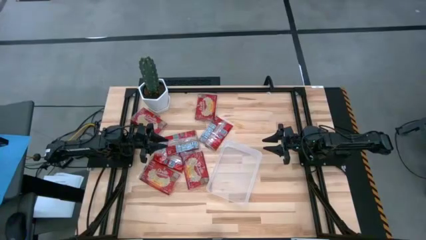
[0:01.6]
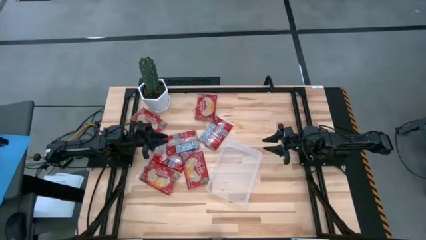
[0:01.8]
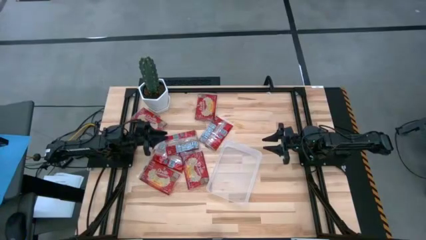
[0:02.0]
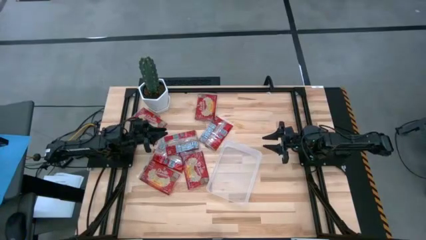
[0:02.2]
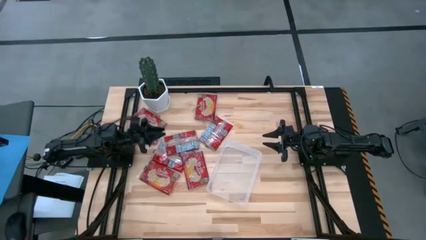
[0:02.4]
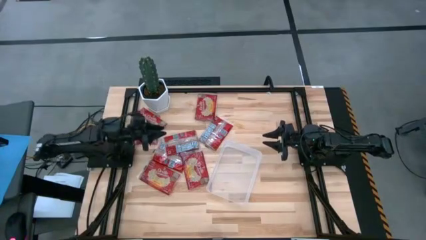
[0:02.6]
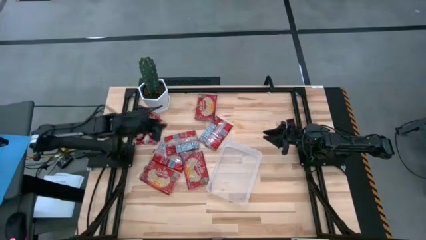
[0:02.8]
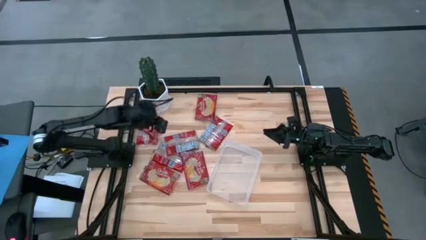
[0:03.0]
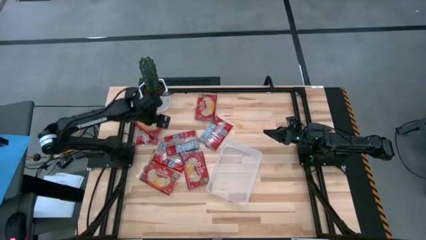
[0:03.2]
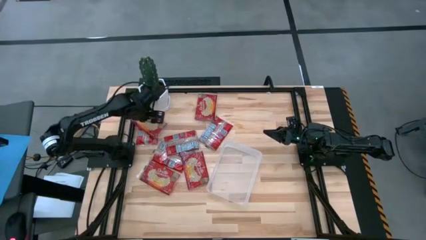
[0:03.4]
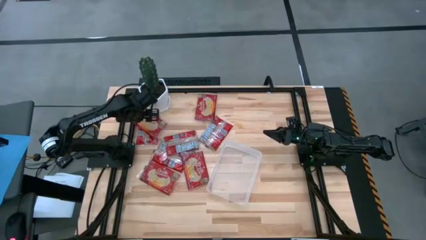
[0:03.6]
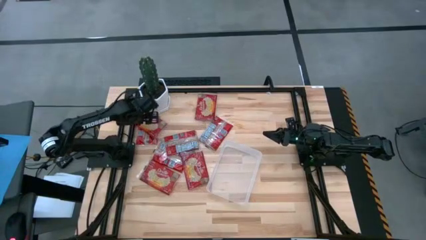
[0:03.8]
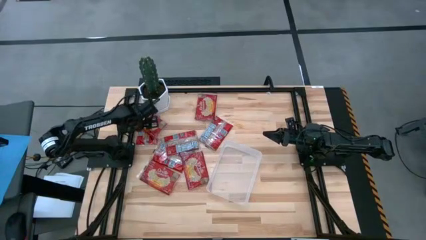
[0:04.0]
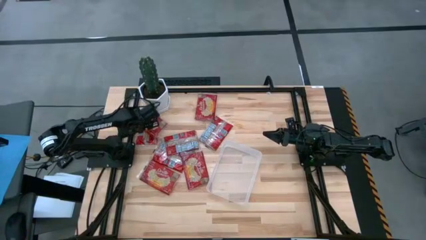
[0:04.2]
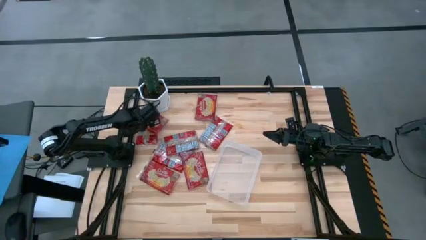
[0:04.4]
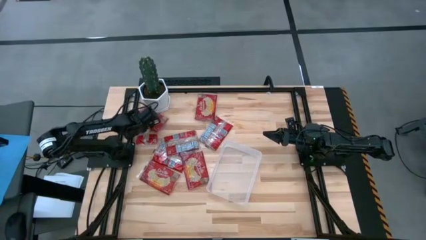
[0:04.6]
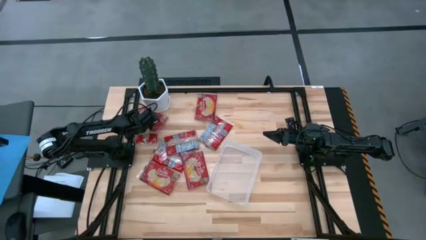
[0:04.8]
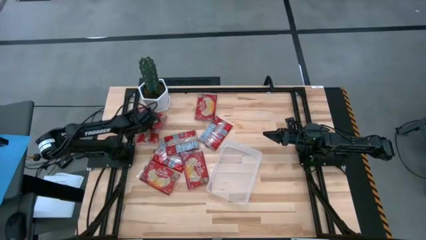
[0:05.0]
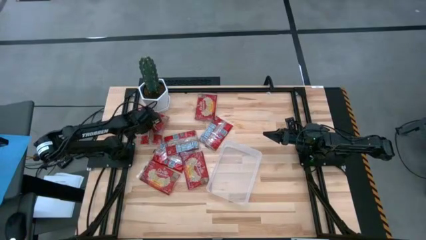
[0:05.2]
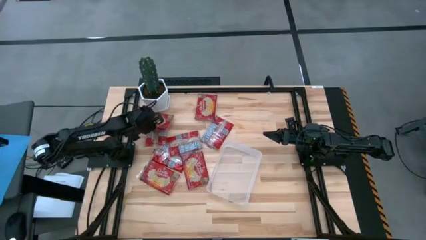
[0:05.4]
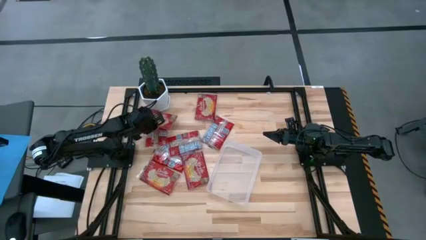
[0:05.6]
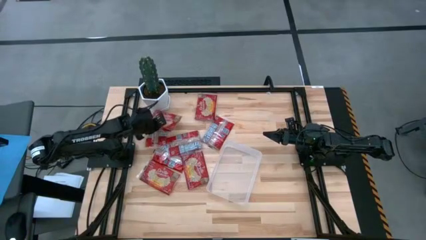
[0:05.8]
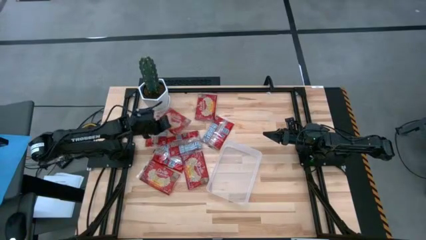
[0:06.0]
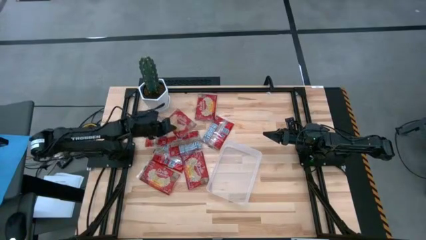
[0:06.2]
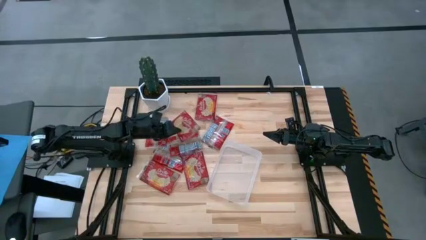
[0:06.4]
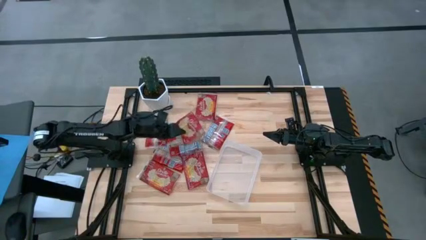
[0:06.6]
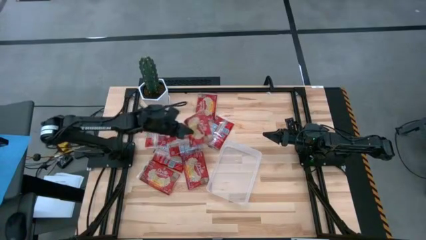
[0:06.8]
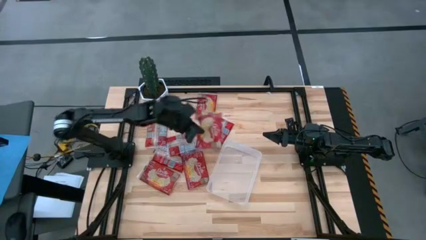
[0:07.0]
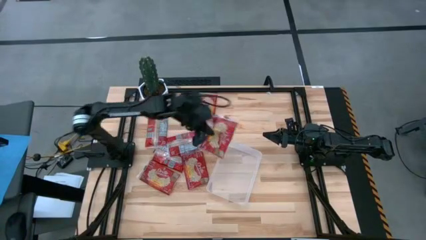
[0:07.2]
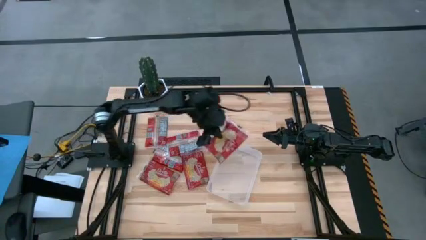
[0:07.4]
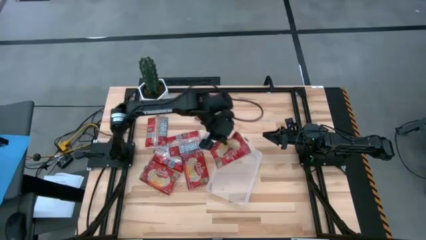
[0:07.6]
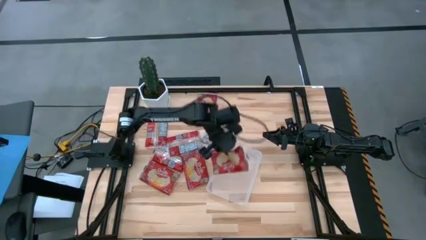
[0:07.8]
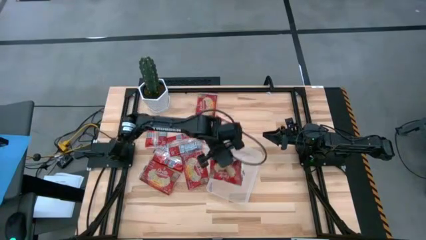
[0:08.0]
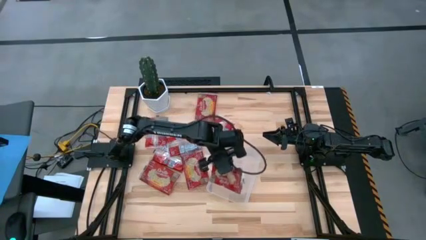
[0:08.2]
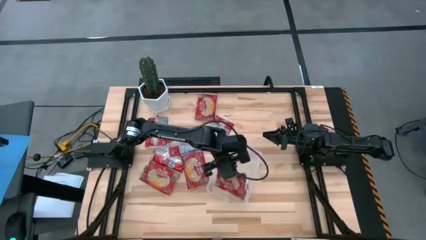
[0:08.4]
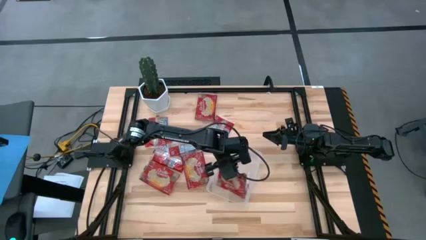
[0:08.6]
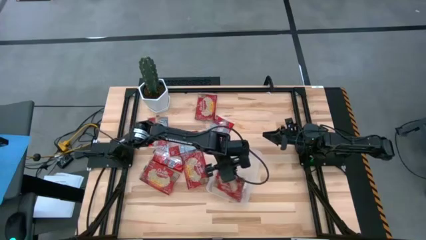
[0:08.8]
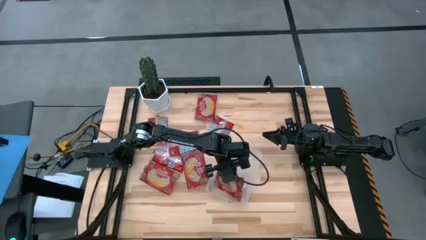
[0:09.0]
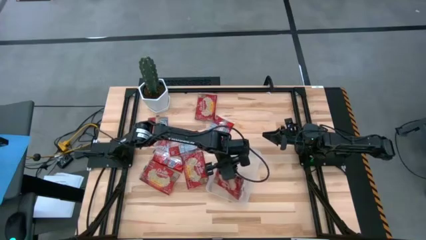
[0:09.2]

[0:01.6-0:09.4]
Task: Sort popcorn bags into baskets
Put the red popcorn bag into the transparent bin

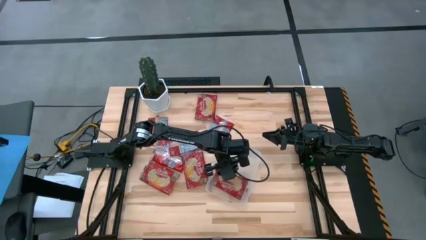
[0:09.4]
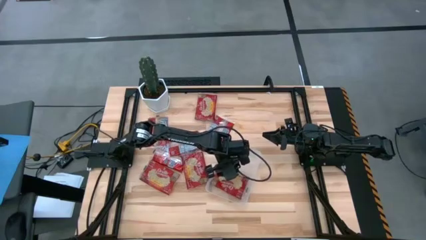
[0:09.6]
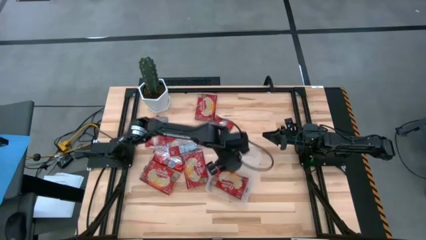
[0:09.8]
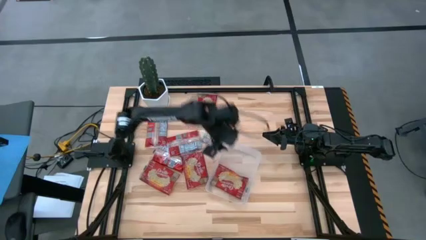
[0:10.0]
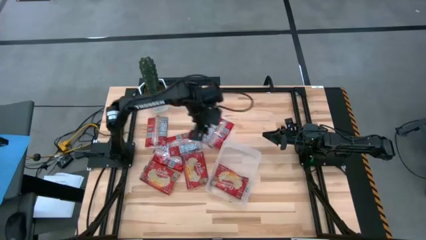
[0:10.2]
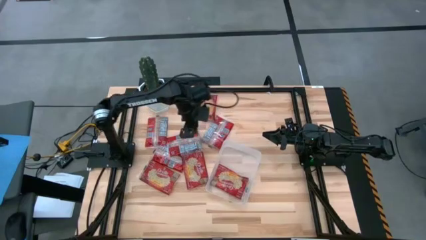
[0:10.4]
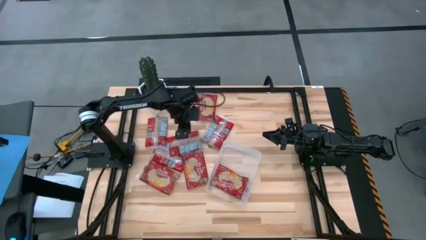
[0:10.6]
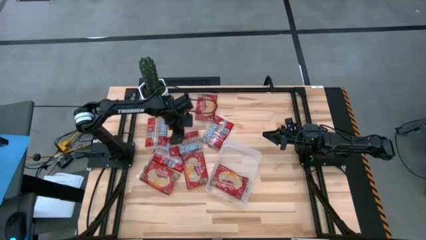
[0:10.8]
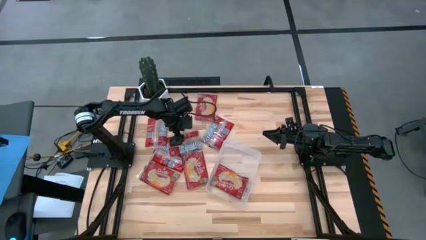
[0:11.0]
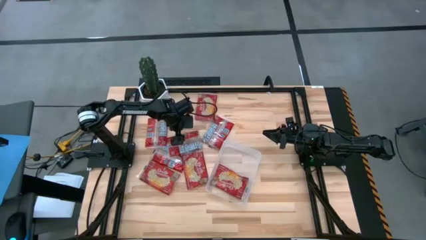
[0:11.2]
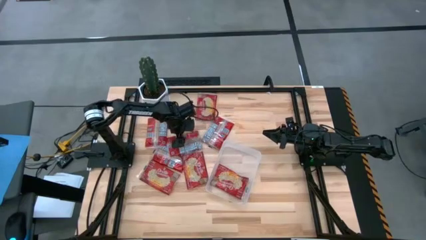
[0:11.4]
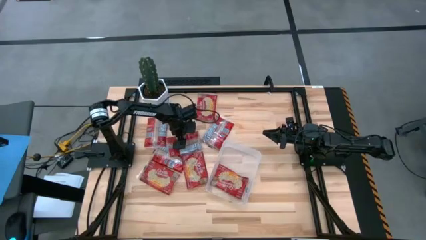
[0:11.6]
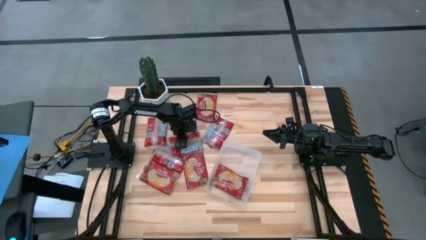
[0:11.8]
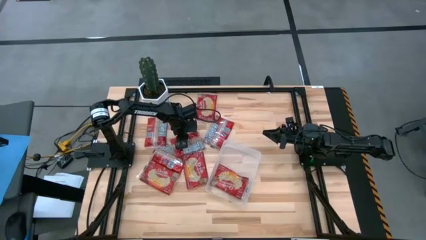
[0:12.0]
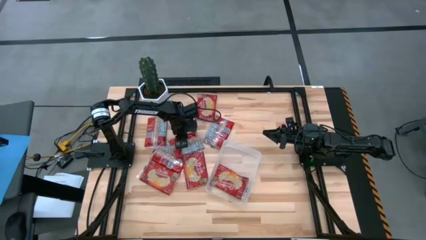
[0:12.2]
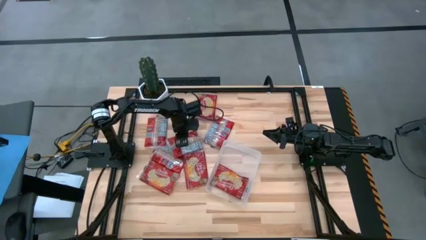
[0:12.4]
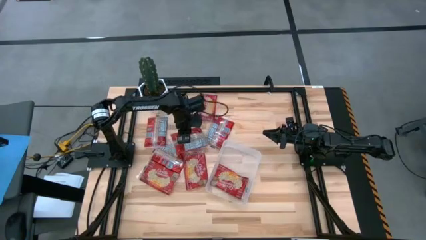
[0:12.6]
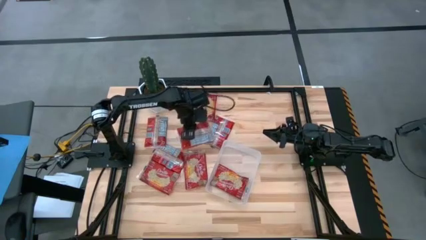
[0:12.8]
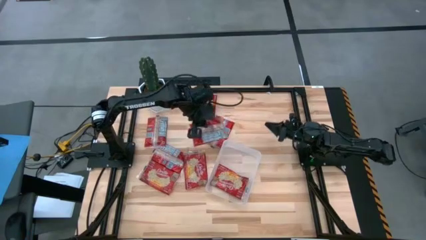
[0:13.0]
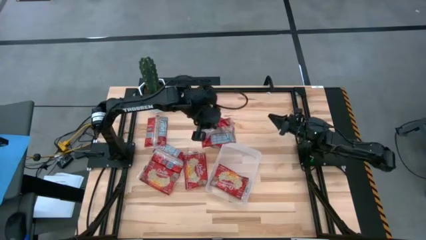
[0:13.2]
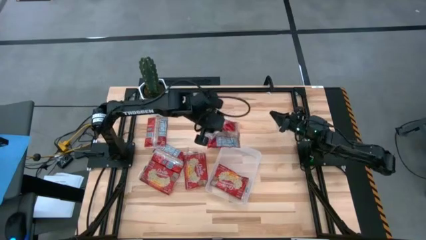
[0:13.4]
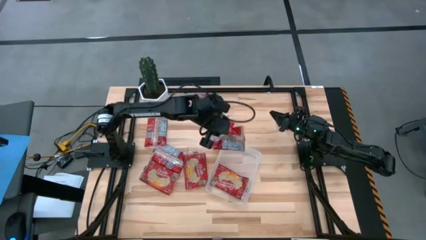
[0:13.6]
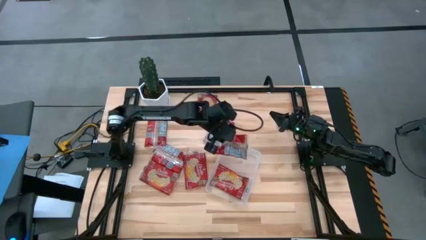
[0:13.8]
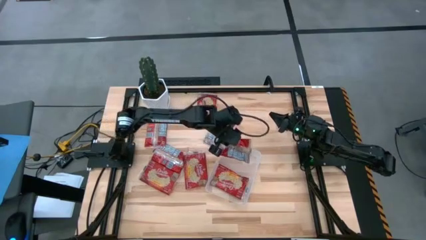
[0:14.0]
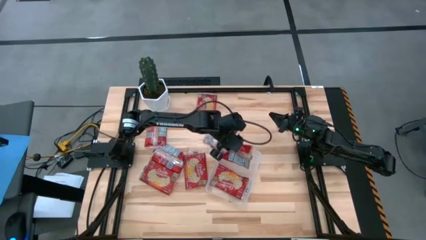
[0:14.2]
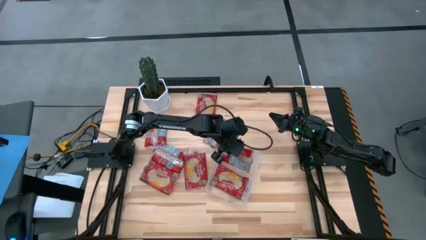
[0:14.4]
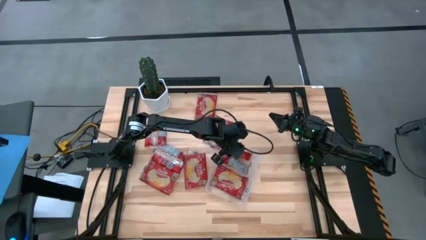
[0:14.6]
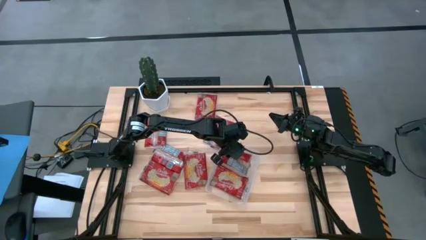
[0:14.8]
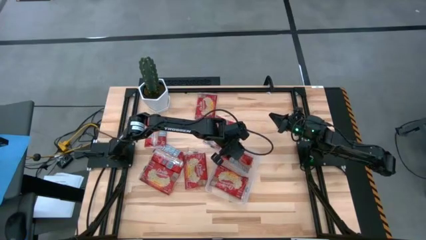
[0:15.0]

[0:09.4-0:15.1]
Put the red popcorn bag into the transparent bin

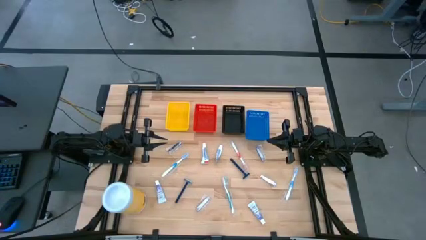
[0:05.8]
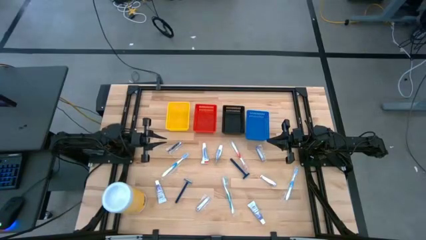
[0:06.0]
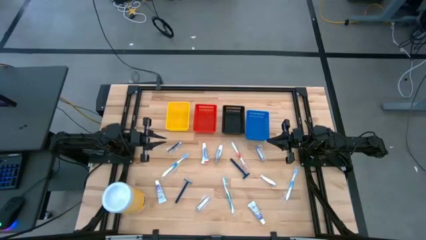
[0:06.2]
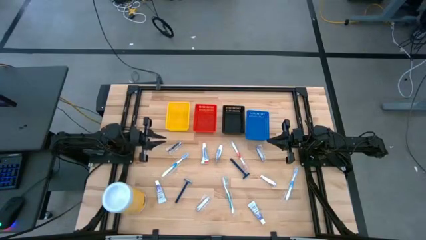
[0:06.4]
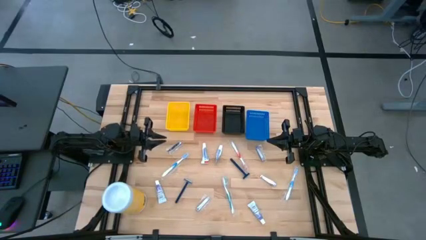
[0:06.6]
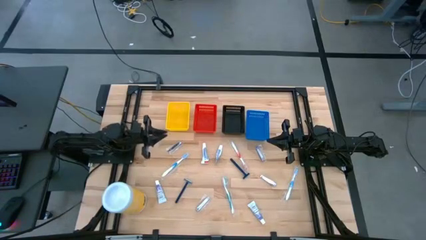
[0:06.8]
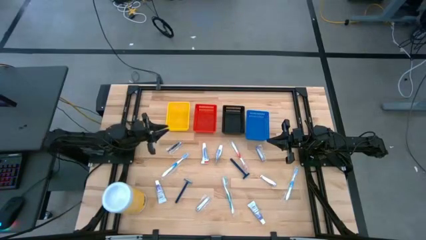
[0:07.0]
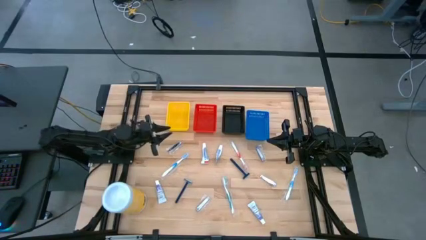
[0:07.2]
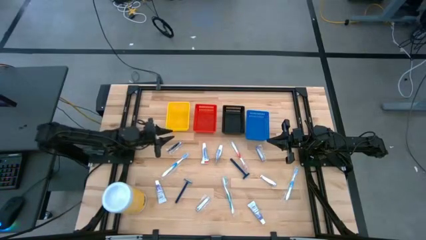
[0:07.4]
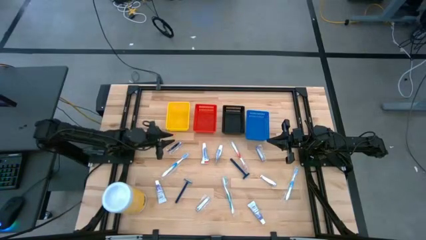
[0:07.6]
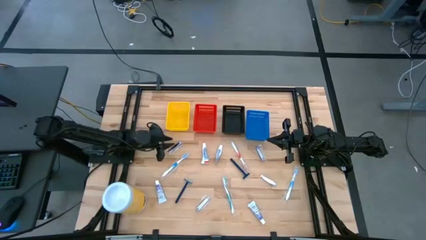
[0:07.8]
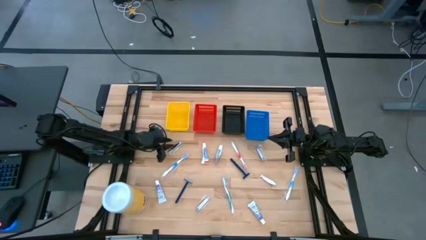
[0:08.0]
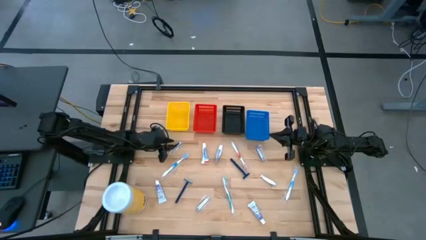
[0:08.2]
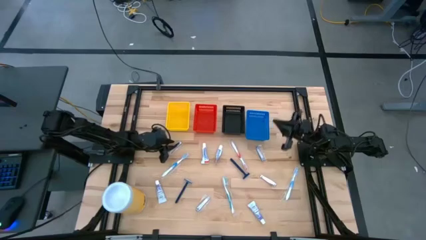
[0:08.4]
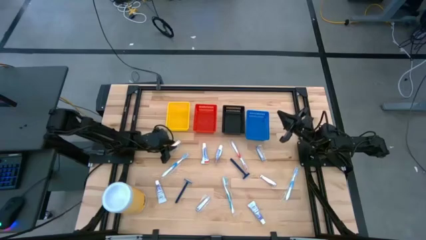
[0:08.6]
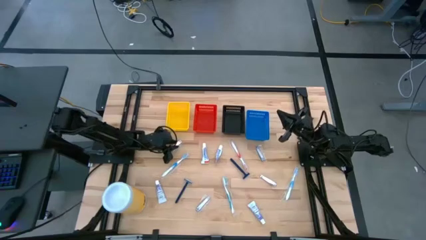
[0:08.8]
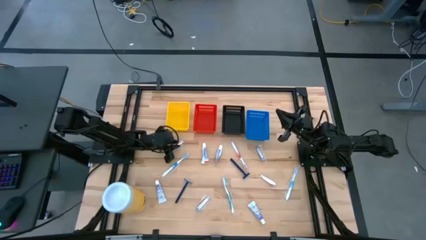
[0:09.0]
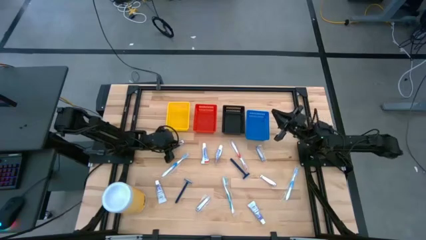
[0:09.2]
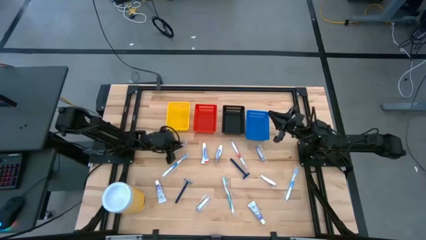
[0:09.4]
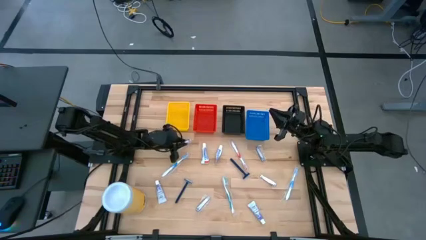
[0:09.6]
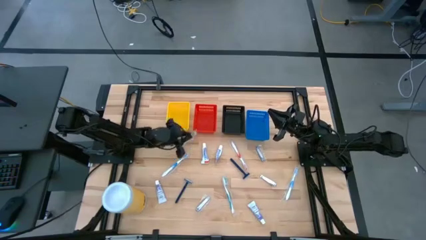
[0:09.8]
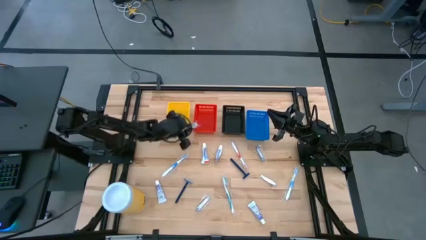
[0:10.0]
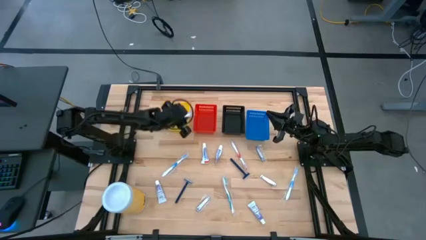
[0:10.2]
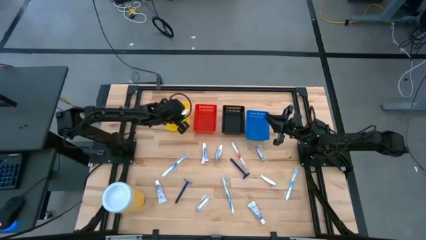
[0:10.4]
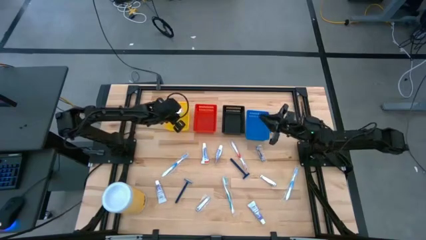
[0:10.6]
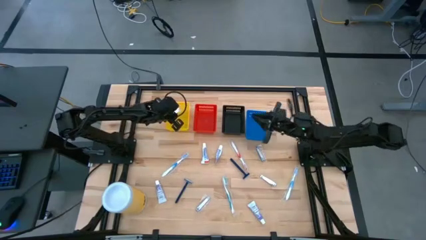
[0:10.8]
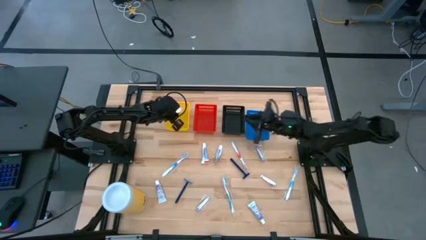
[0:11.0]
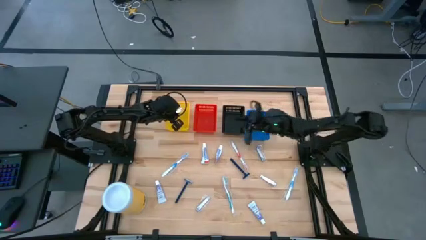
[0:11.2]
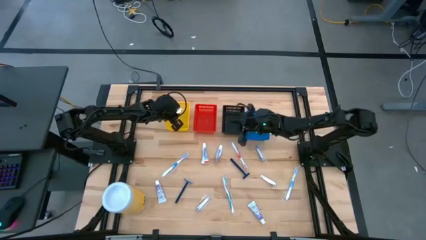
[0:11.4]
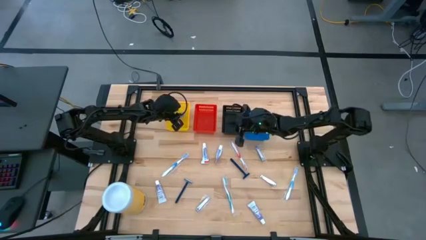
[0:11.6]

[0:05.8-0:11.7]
Task: Pick & Place Travel size toiletries
Put the silver nail cutter into the yellow bin
